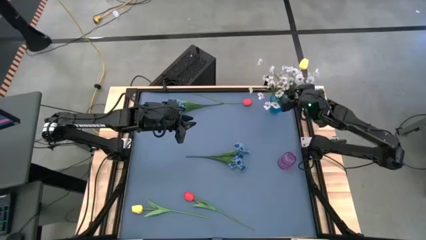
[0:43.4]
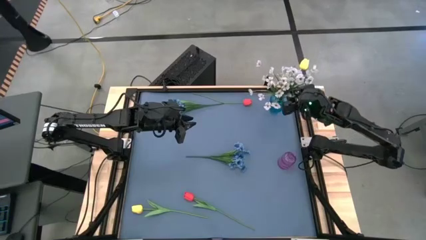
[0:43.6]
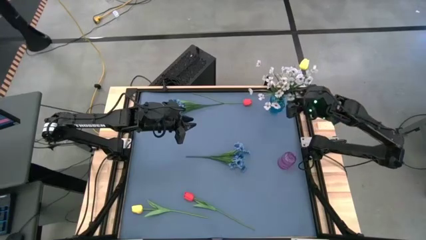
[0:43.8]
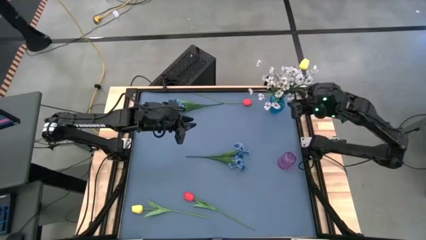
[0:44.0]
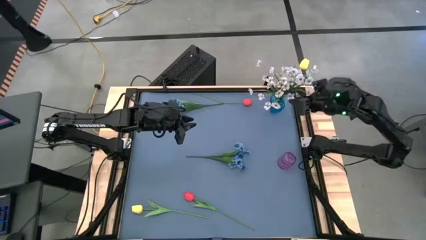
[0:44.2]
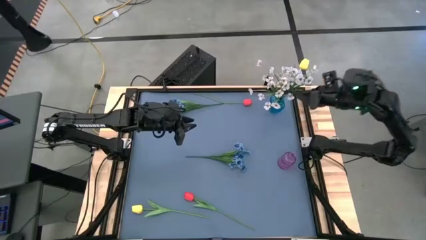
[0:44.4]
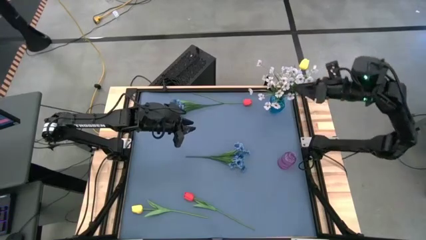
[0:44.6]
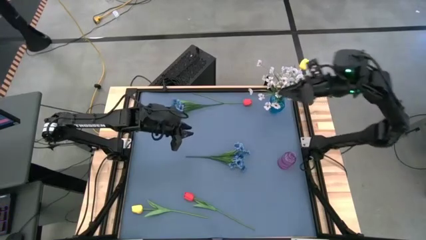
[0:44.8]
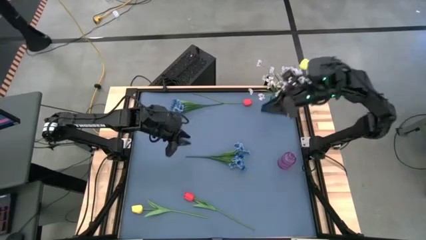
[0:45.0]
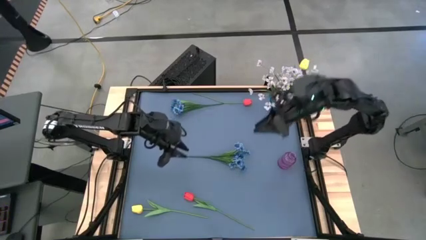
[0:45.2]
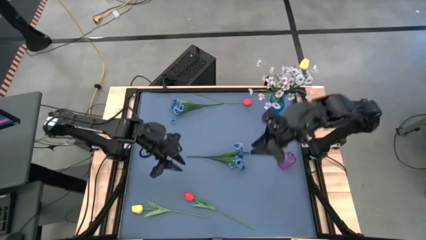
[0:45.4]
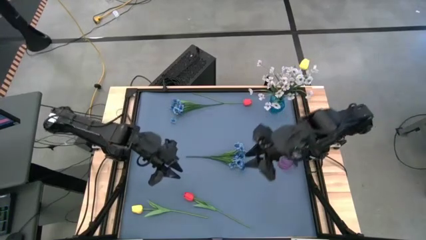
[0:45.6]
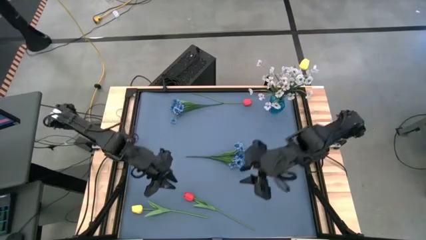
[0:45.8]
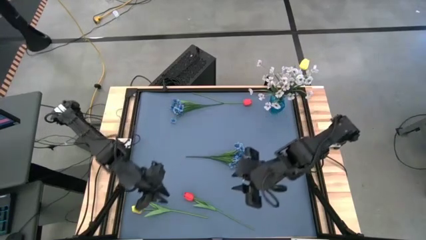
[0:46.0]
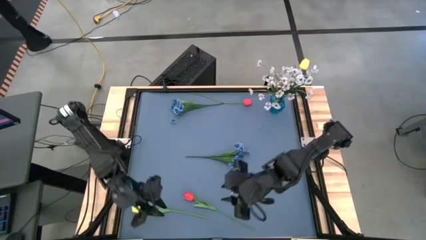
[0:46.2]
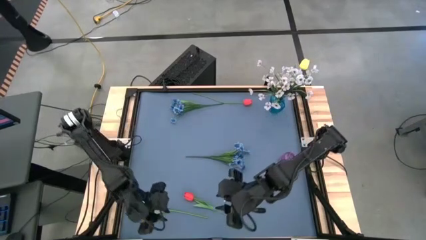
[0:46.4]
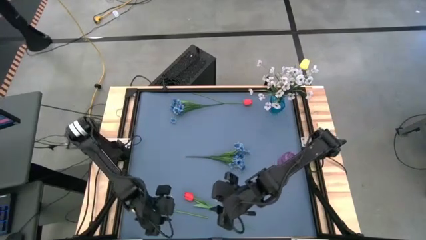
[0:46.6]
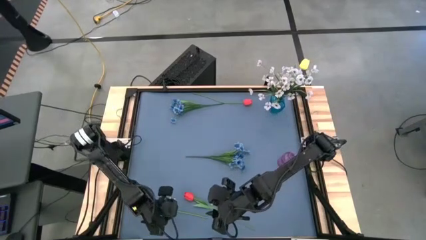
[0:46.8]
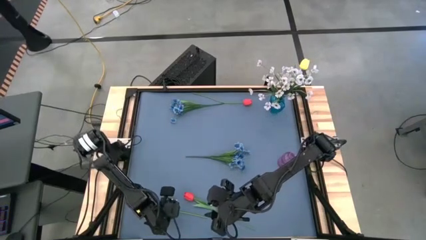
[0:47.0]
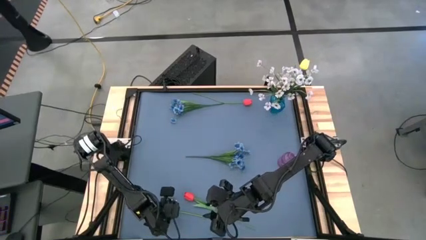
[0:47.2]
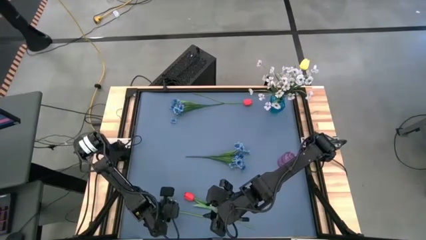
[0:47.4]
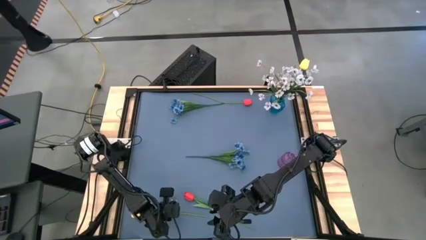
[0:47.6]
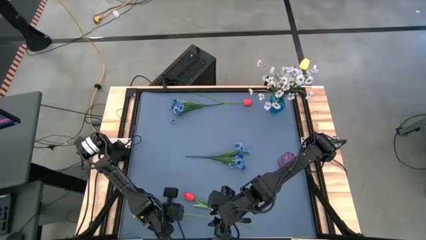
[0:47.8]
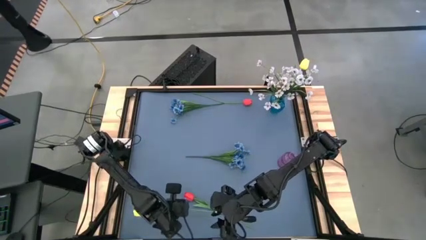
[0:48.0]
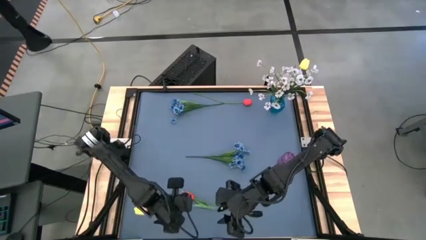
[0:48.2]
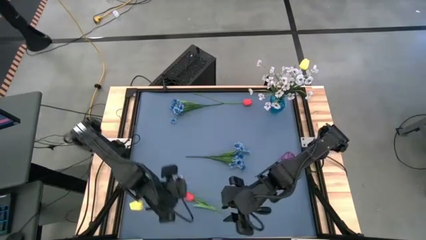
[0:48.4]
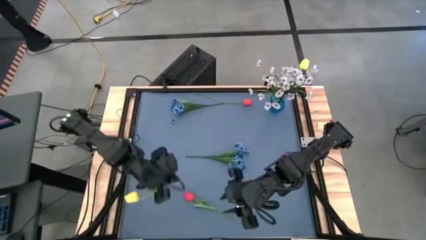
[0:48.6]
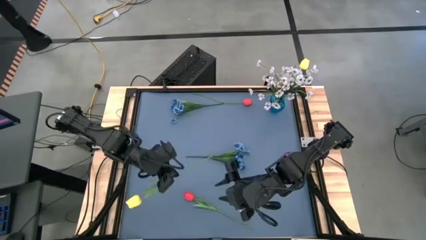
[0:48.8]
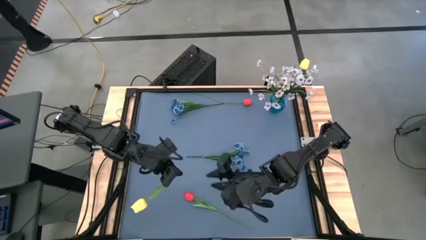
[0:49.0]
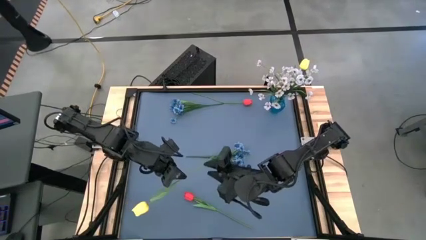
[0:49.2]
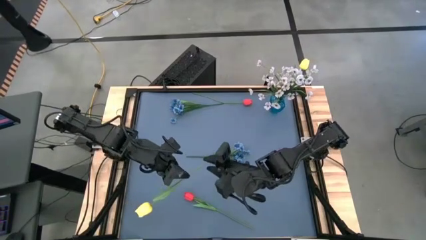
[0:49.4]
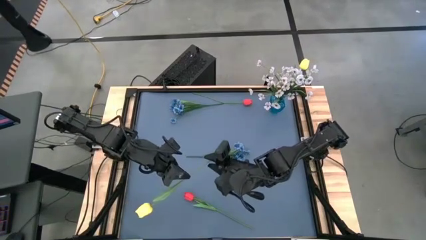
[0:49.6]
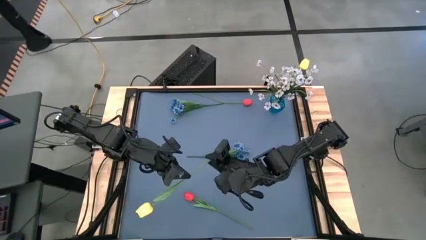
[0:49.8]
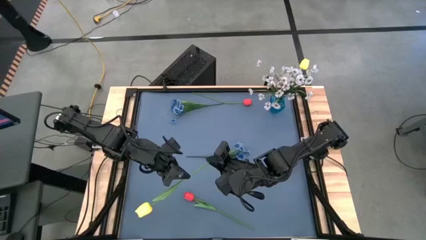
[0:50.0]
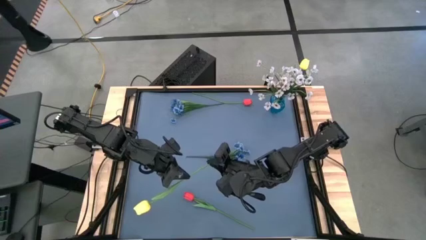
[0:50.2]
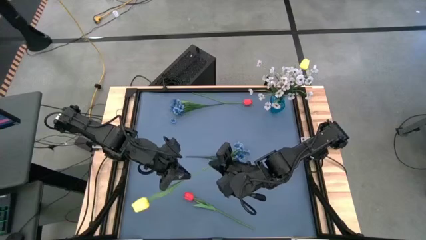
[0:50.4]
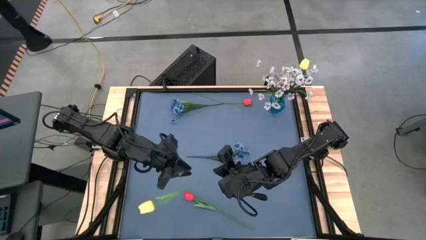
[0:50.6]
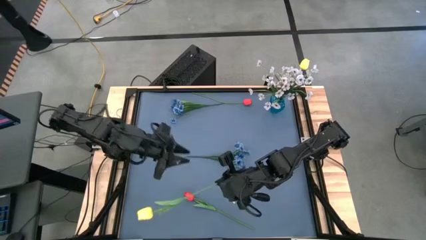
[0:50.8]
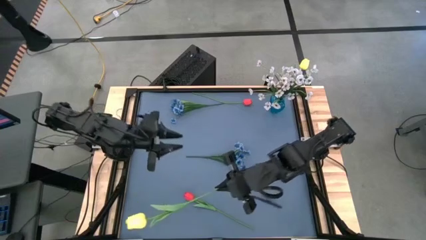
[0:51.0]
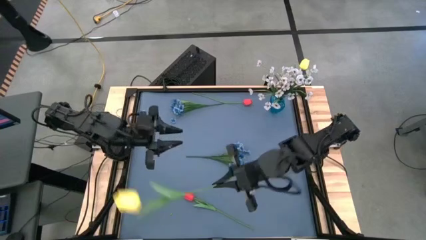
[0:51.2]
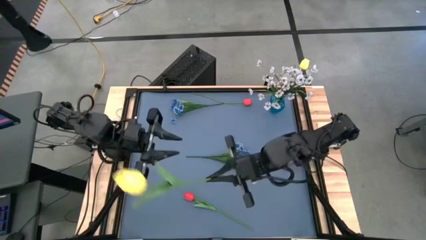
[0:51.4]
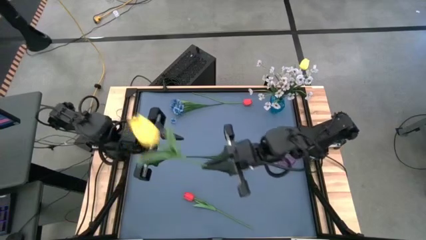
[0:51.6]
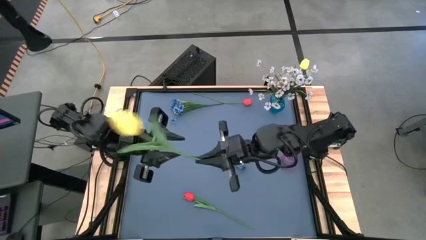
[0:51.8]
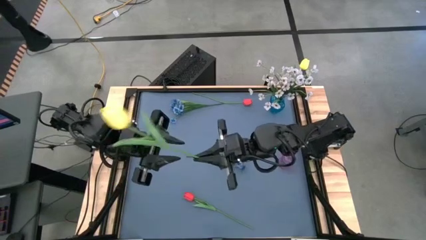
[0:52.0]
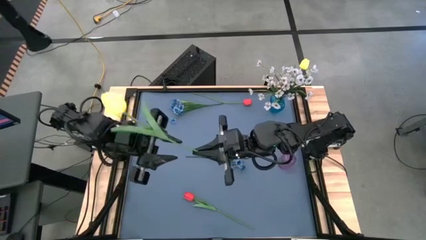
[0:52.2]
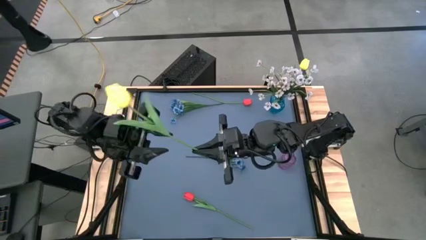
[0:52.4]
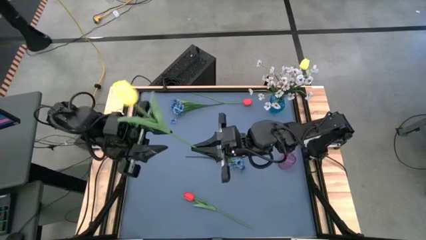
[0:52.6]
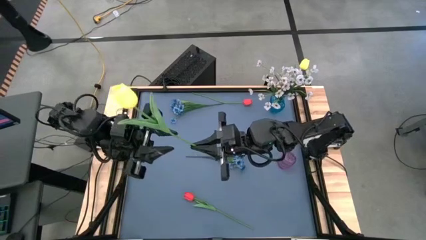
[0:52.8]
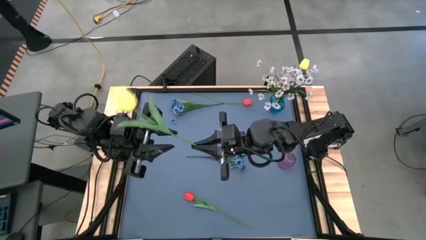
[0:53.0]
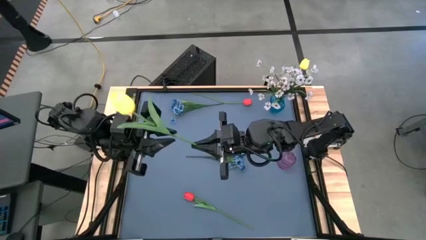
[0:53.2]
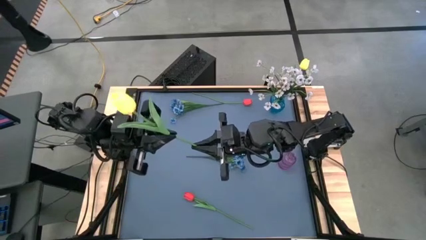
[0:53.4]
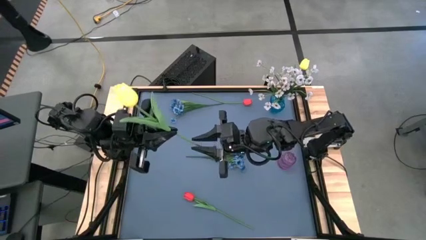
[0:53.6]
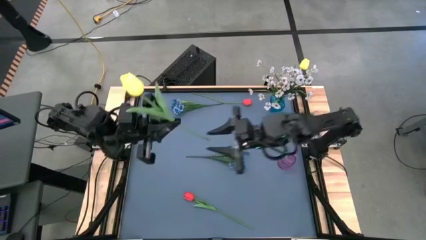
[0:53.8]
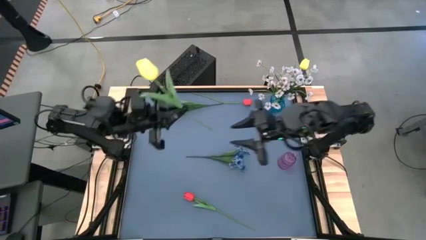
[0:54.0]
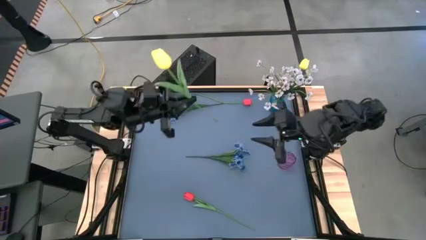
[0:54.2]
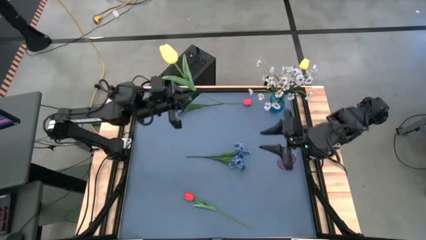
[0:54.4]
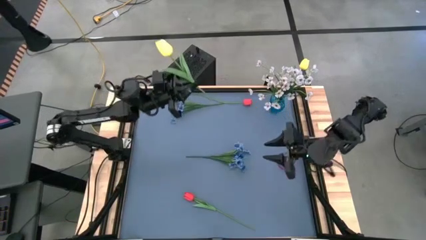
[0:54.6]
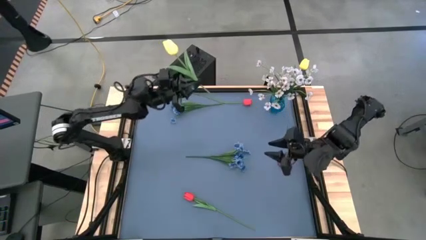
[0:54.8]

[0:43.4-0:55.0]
Task: Sort flowers into vase by color
Put the yellow flower into the blue vase
